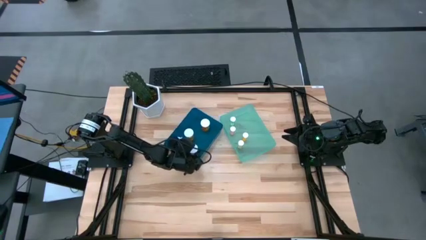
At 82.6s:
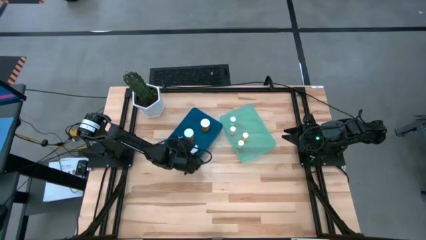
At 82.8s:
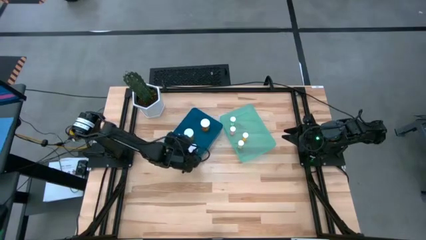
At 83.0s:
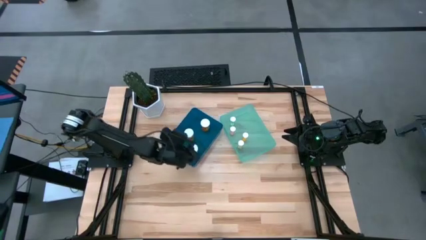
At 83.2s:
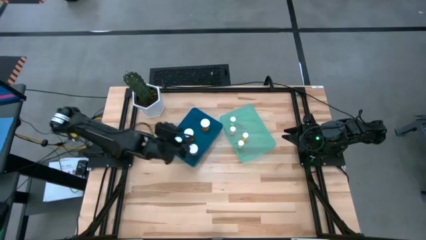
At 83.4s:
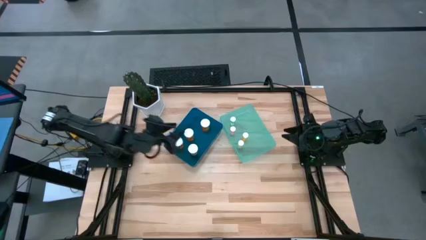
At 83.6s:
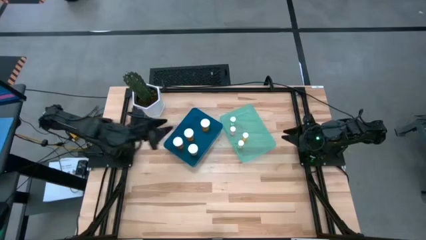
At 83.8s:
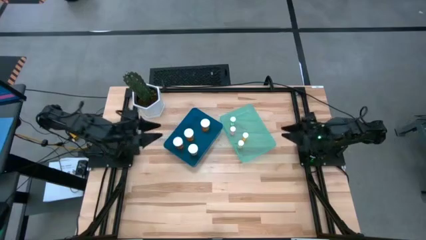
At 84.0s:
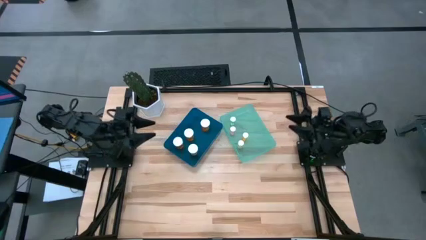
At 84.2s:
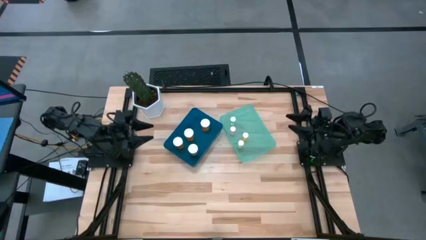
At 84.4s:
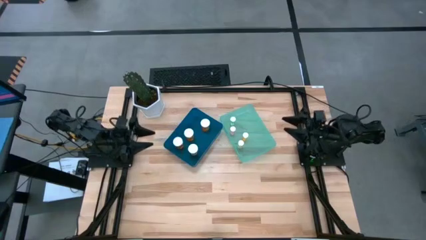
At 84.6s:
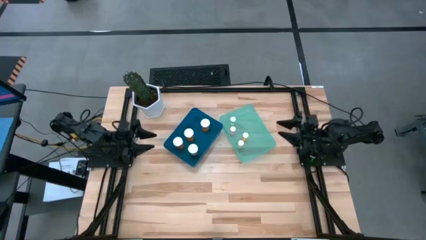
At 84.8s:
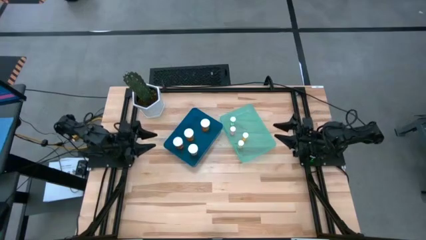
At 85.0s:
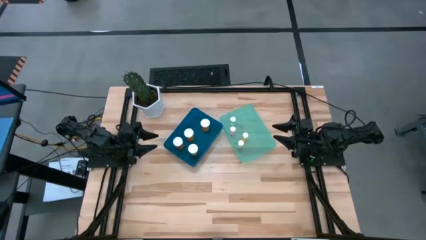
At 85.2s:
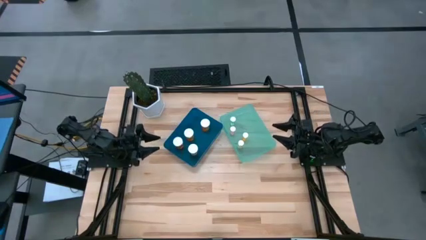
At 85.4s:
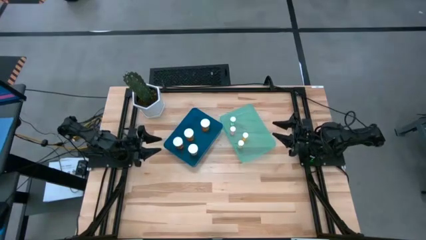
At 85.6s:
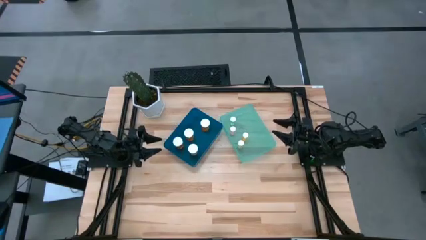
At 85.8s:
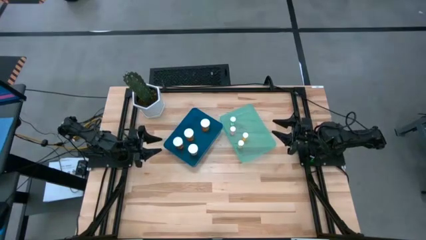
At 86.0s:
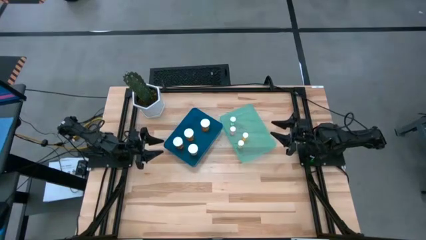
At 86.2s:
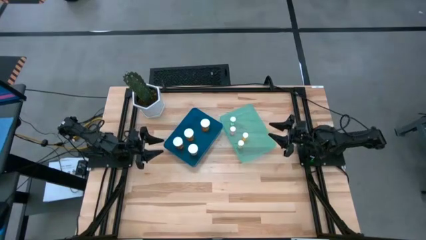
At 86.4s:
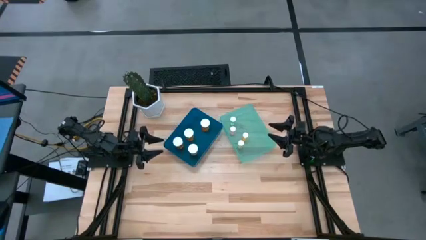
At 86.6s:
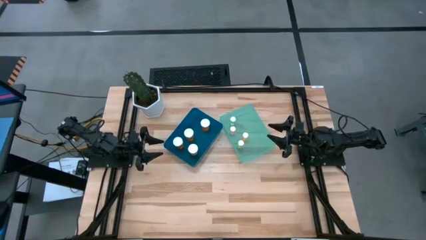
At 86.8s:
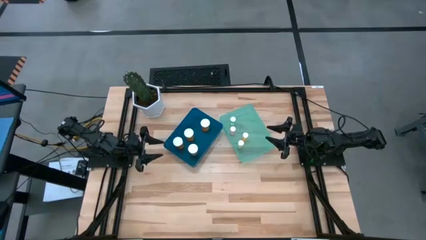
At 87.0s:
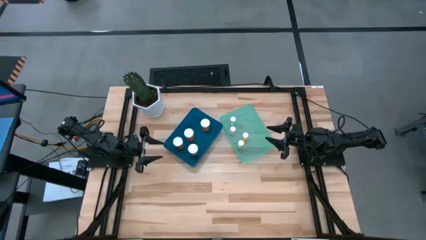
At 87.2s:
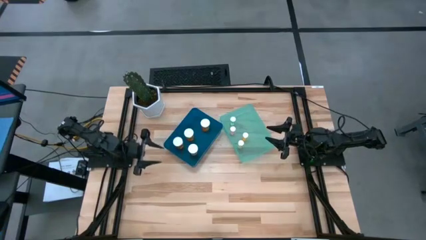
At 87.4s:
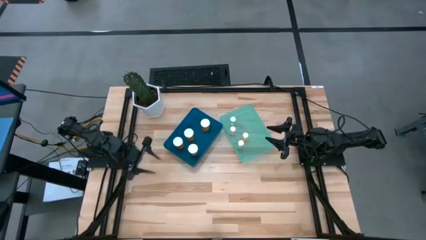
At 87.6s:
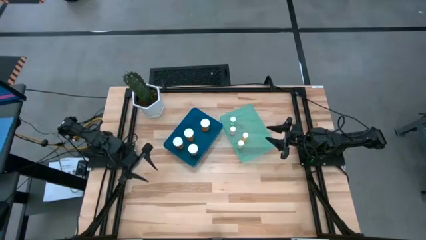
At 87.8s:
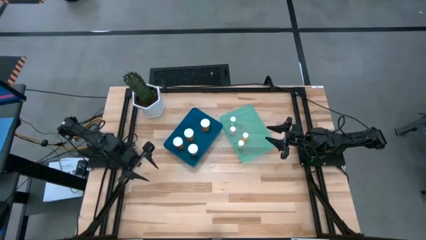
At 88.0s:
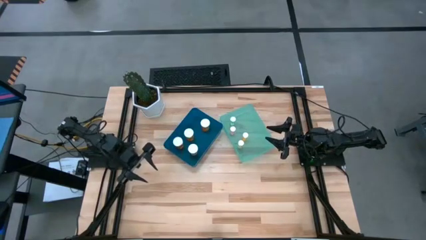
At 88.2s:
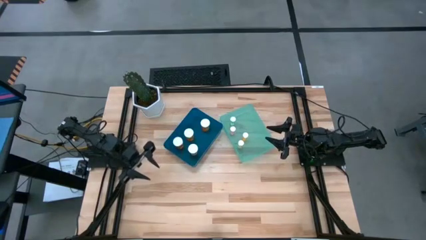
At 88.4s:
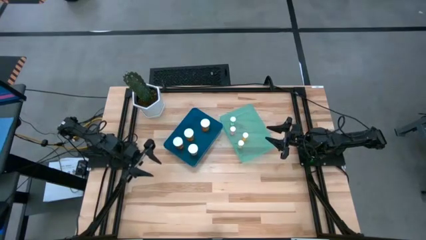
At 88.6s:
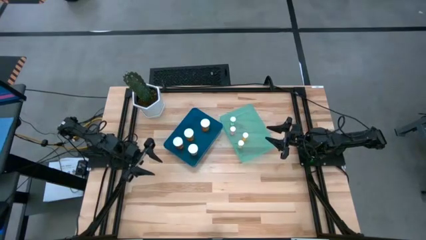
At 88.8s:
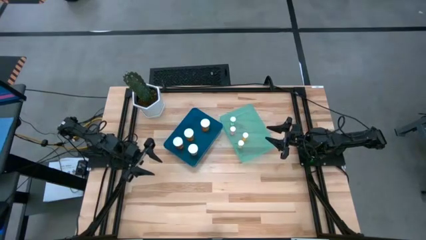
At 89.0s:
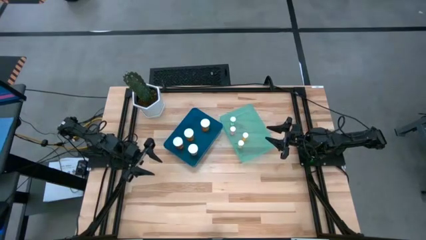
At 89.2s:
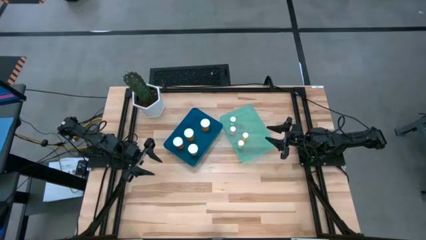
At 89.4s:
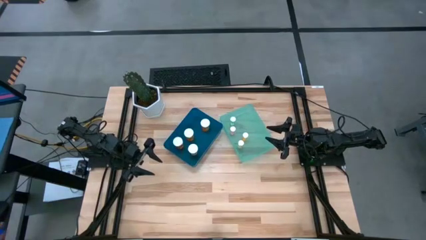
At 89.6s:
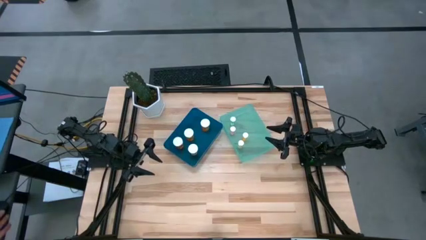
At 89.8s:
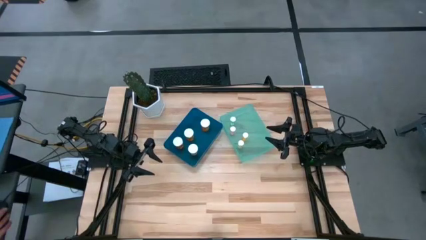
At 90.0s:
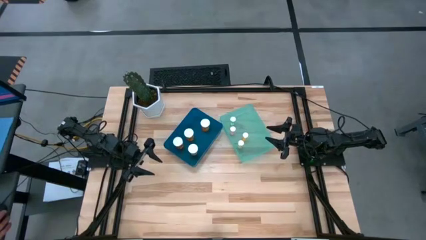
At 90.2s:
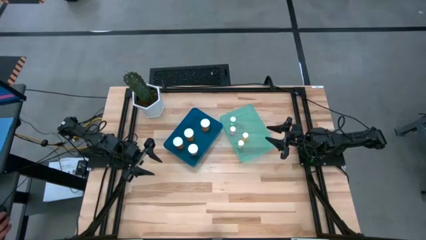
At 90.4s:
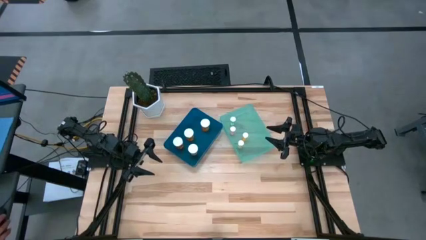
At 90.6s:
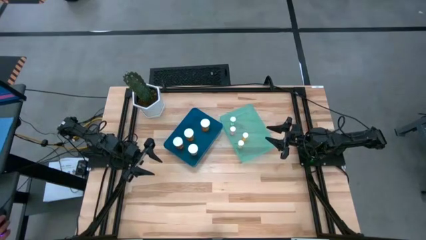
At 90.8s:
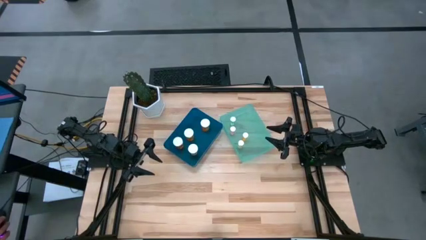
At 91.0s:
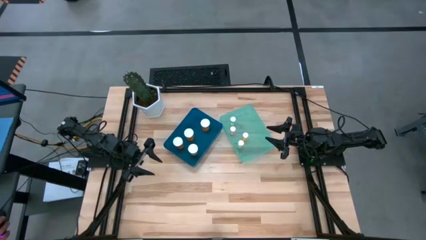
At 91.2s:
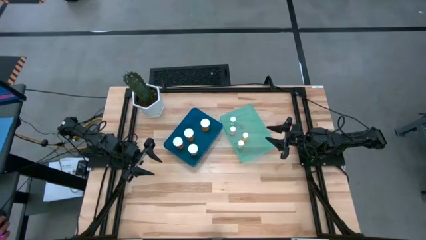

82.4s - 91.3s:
Task: Pick and place medicine bottles into bin by pill shape (circle, oval)
Return to Home Position

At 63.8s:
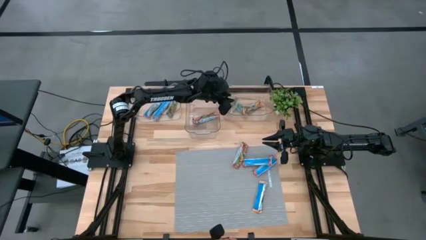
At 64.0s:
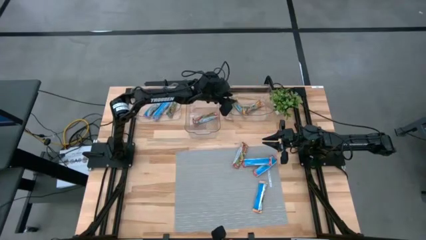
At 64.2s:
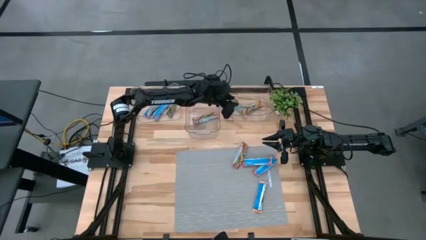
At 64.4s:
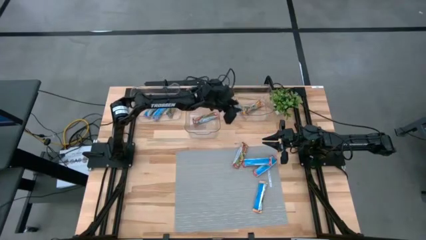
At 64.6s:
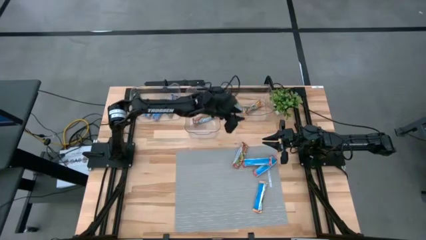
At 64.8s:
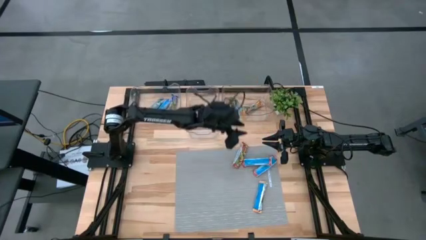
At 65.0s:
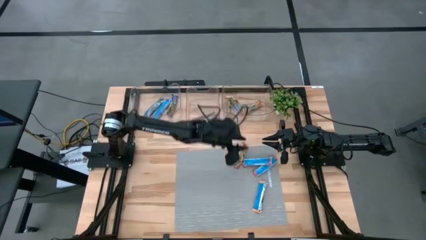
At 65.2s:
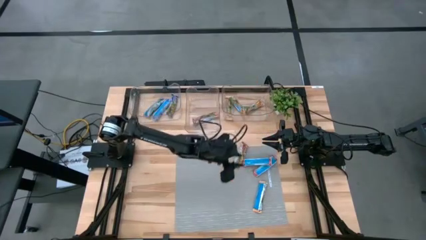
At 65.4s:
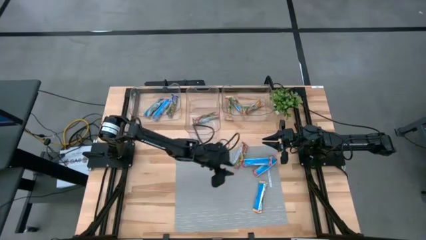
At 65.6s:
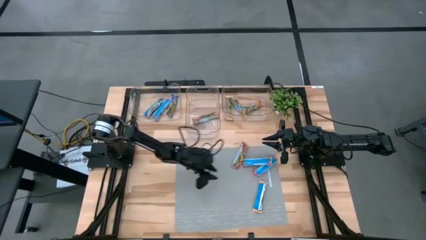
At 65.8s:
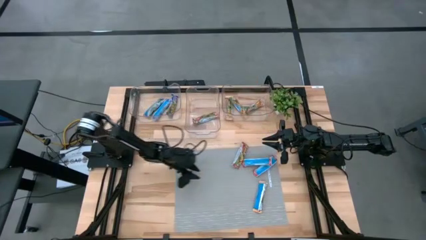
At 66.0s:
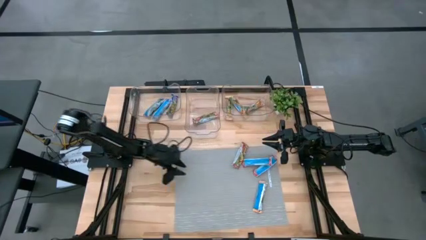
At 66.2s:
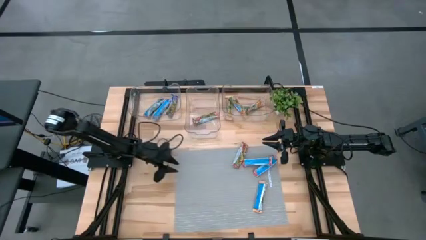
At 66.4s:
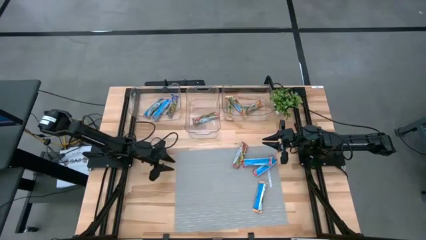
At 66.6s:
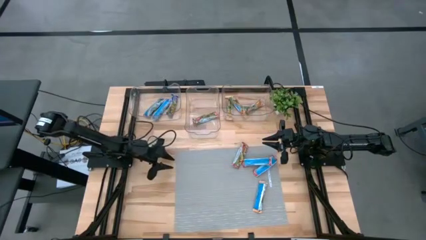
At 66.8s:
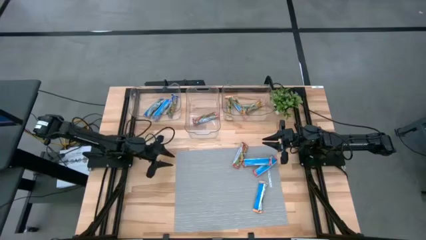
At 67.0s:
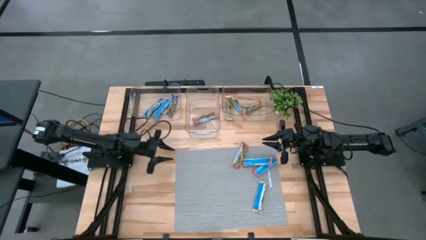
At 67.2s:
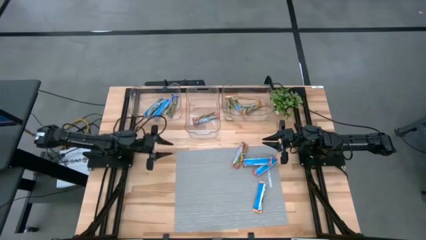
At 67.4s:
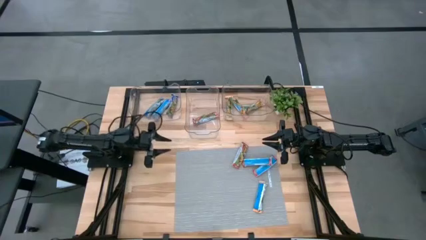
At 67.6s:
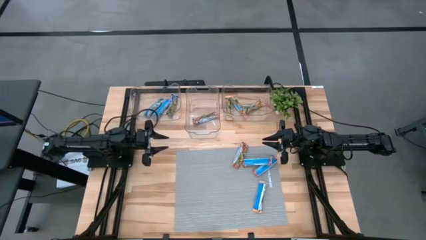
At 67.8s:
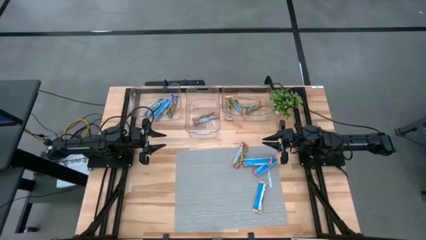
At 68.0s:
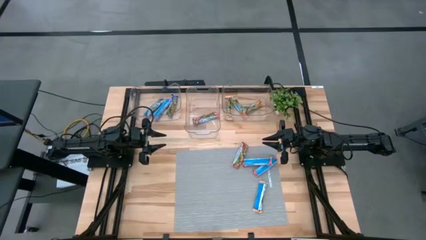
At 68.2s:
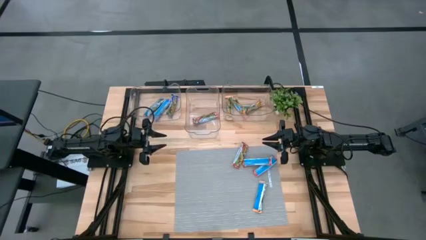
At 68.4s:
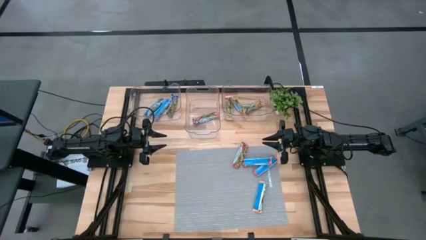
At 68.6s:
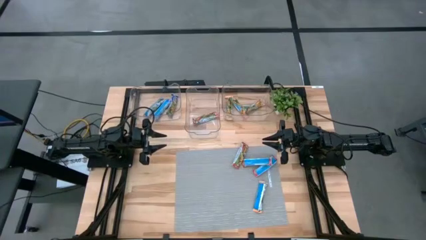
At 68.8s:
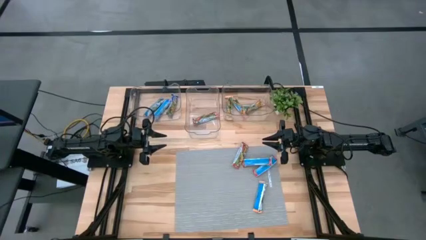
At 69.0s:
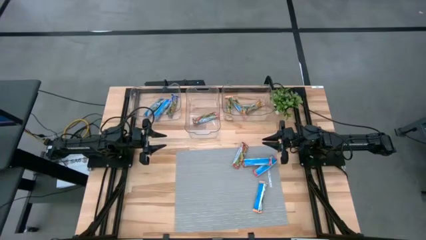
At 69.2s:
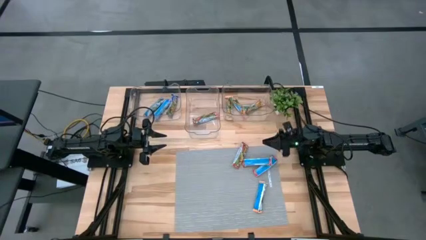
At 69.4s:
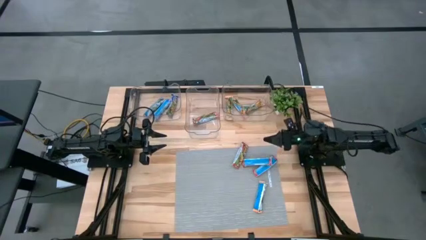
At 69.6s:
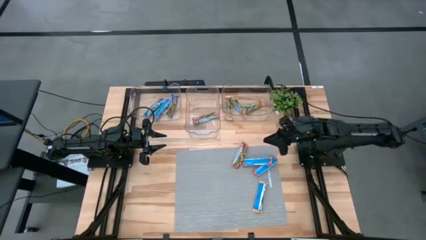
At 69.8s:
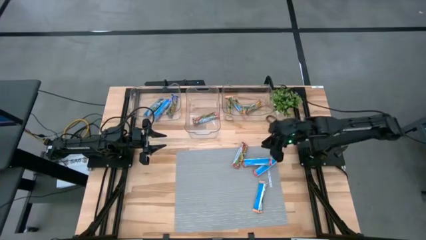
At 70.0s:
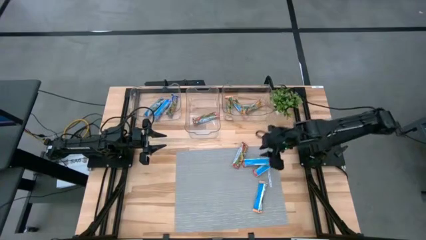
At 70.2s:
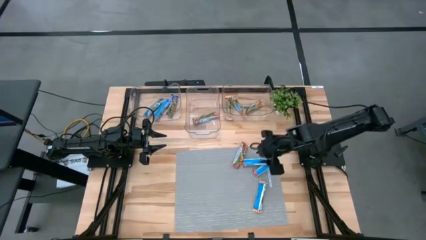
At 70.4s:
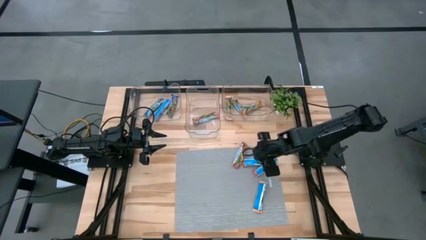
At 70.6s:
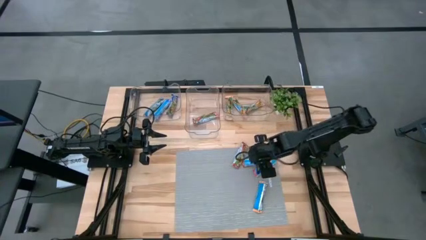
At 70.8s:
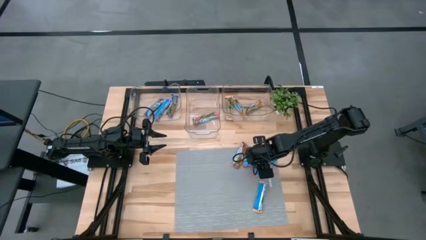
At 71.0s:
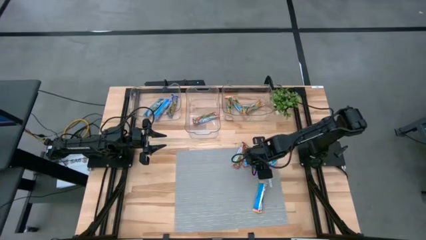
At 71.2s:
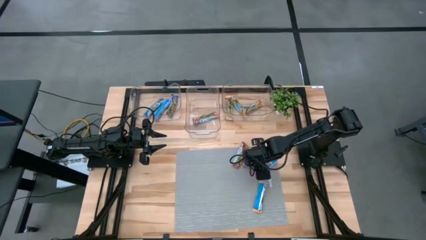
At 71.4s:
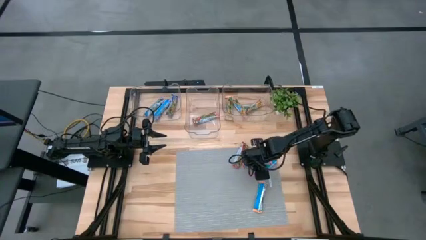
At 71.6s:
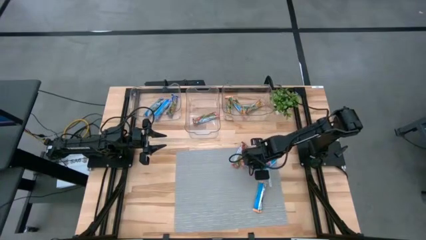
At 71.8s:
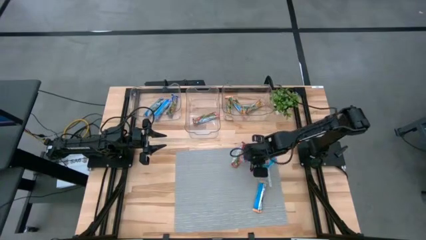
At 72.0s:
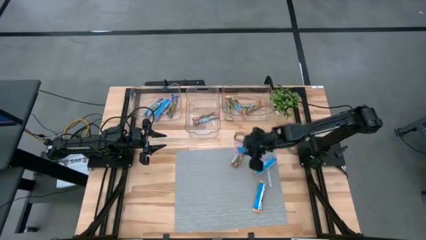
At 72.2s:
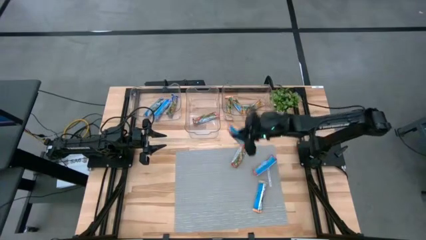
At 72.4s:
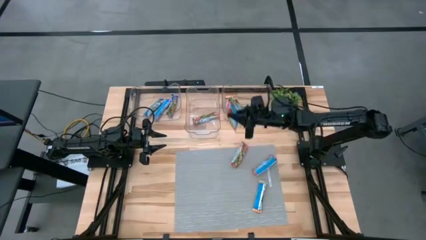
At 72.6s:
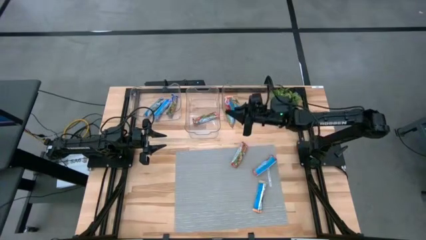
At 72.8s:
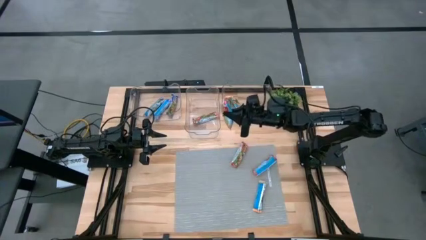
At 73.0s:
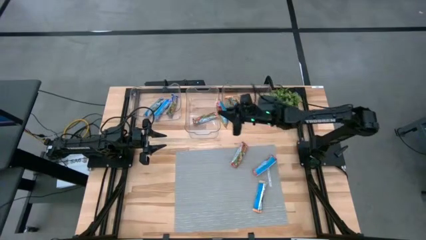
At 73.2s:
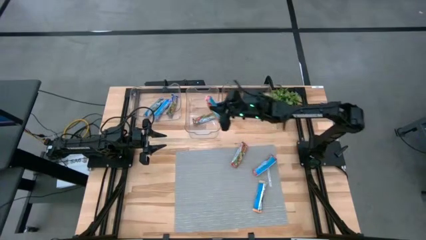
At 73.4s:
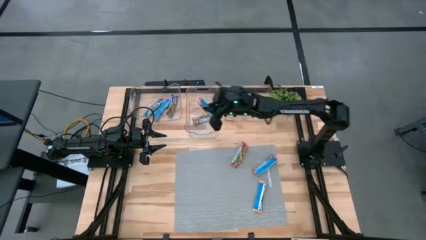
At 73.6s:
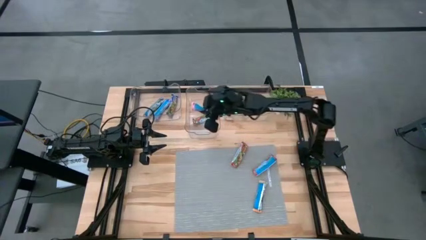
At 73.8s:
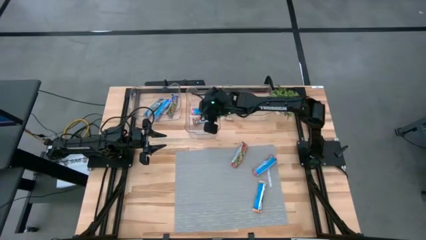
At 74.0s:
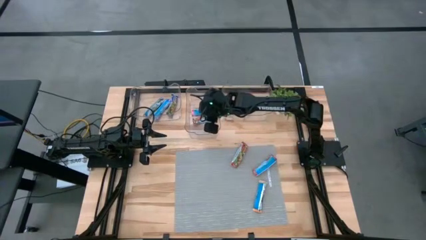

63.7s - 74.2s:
Task: Pick and place Granola Bars by type
Put the red granola bar into the middle transparent bin
